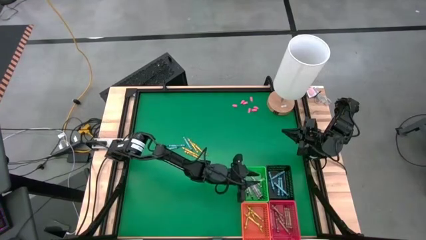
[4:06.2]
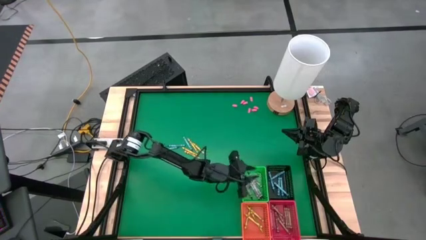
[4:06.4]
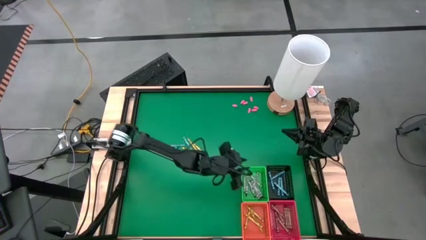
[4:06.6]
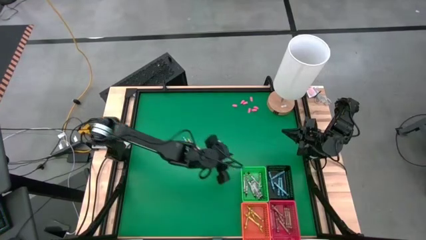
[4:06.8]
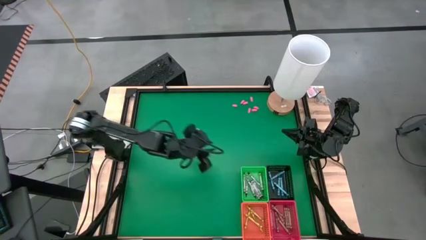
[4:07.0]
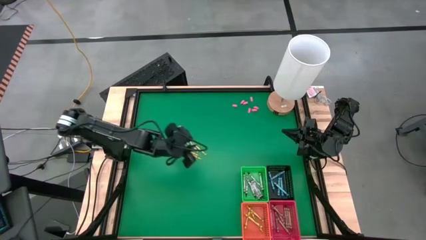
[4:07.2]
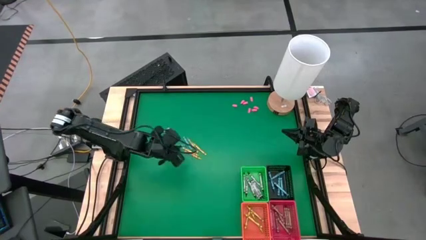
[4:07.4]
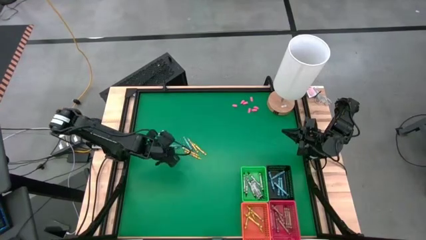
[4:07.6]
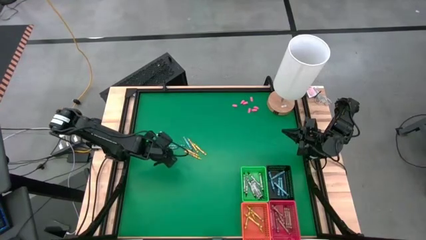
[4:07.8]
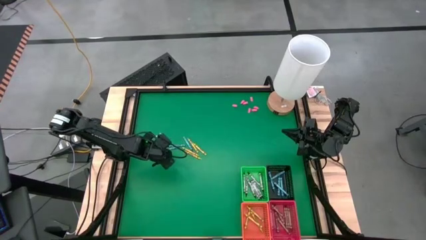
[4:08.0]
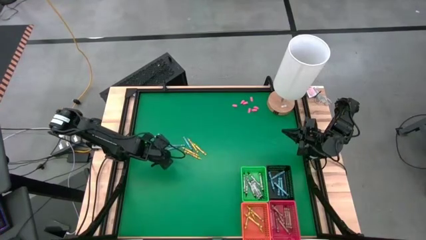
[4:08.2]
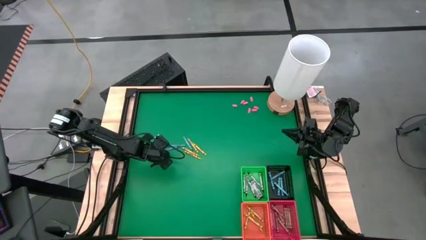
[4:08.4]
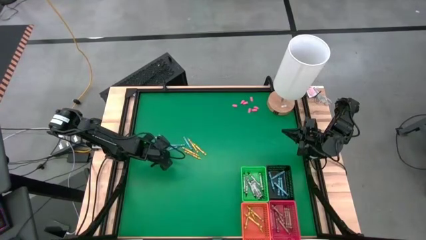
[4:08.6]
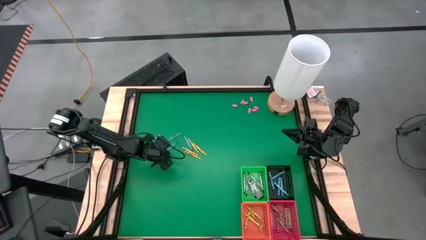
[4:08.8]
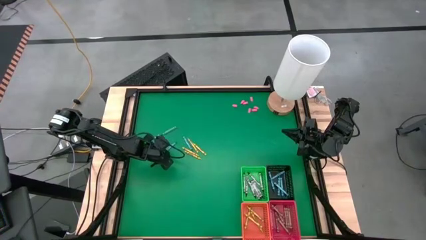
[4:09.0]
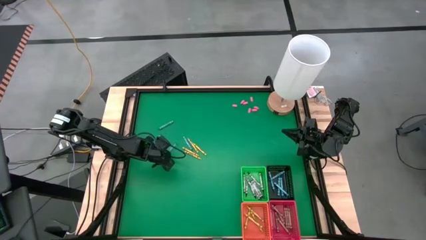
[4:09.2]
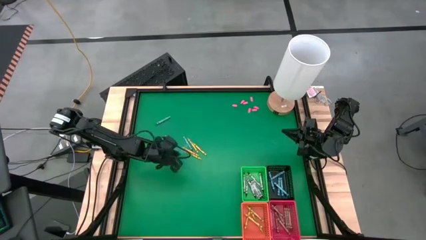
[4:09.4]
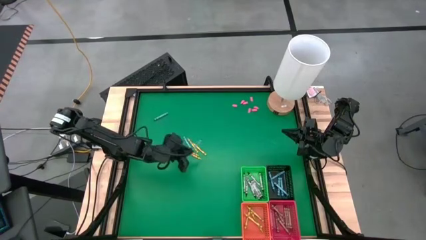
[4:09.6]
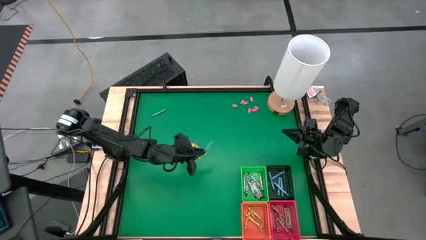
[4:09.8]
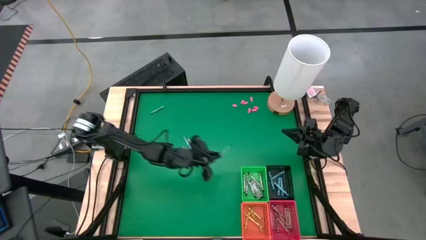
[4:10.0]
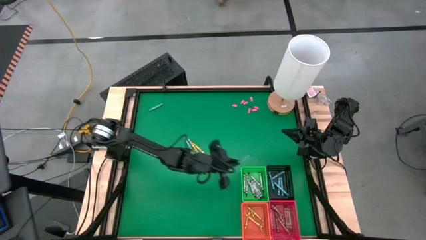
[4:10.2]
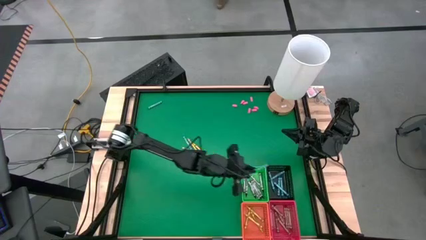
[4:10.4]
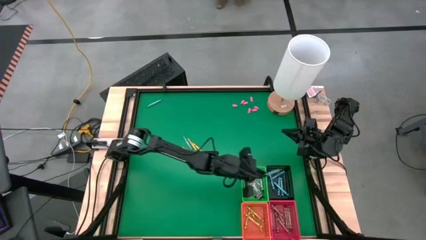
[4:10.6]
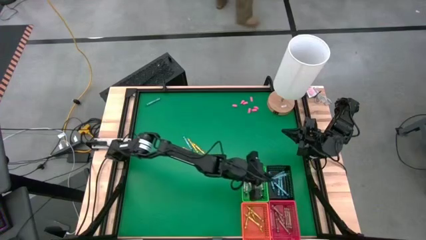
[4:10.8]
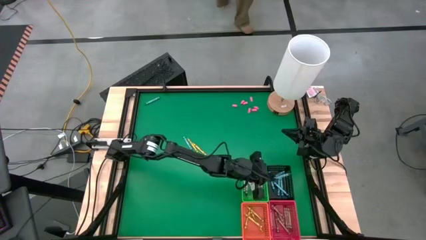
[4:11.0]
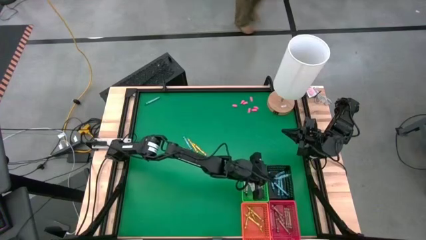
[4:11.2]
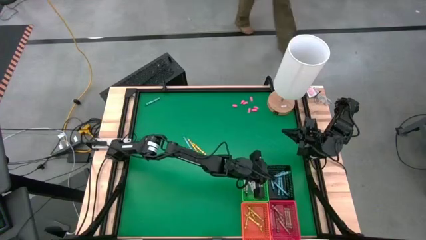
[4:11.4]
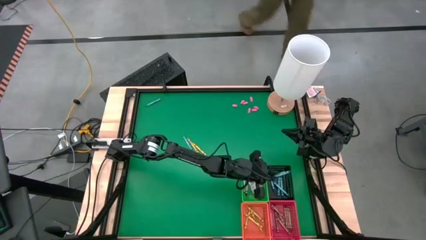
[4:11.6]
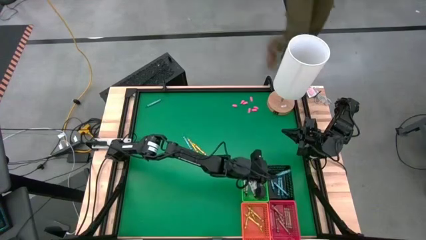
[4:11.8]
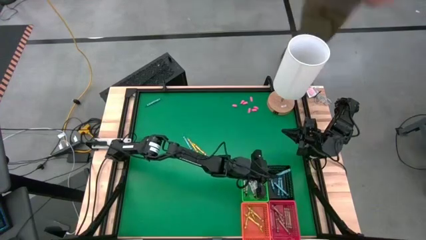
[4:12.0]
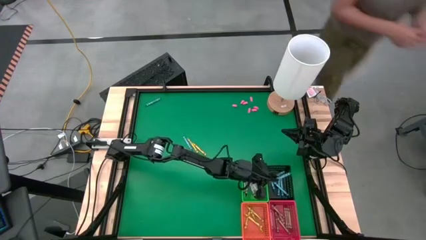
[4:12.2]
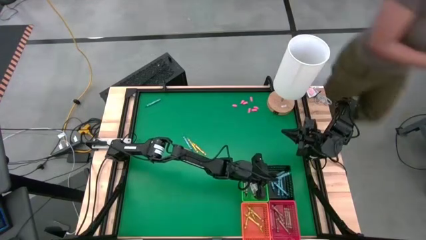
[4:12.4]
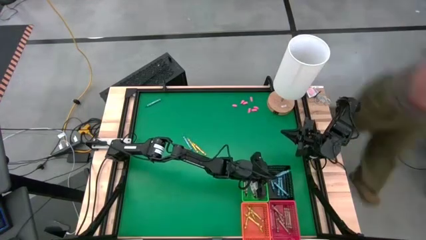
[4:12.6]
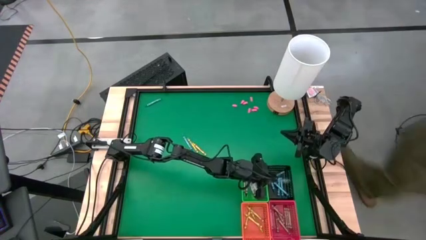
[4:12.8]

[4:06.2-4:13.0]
Task: Sort crayons
Put the blue crayon into the black bin

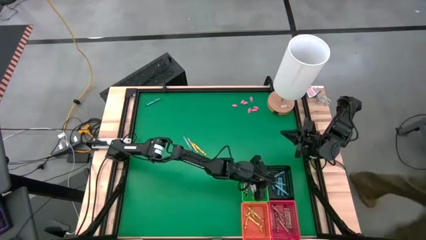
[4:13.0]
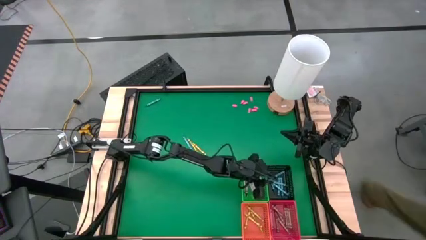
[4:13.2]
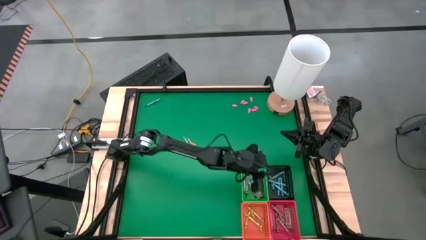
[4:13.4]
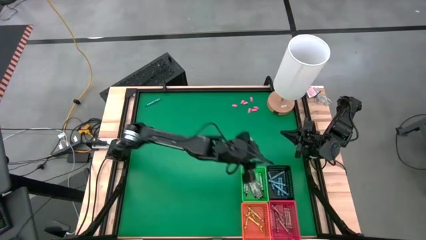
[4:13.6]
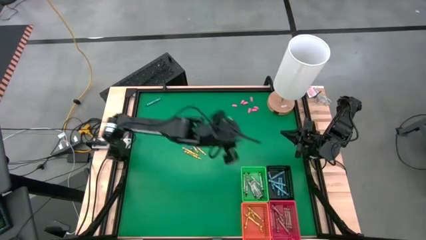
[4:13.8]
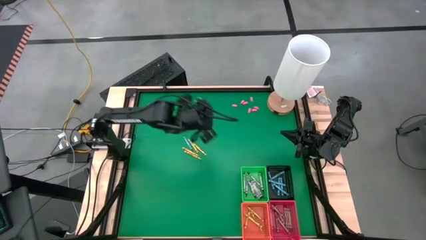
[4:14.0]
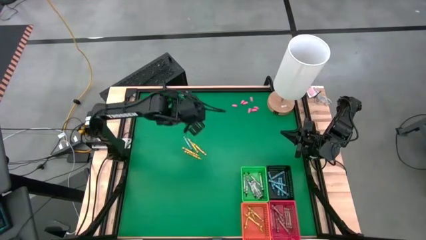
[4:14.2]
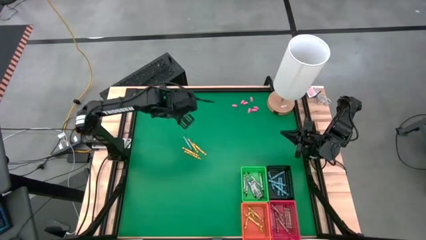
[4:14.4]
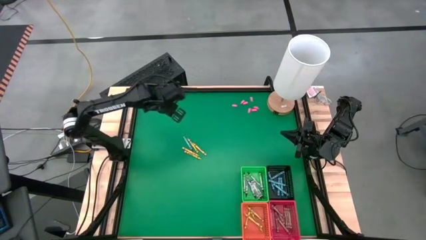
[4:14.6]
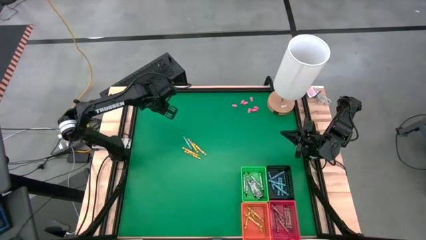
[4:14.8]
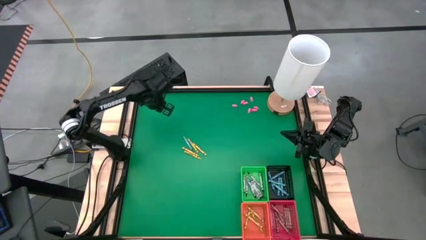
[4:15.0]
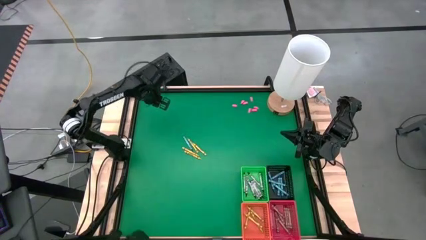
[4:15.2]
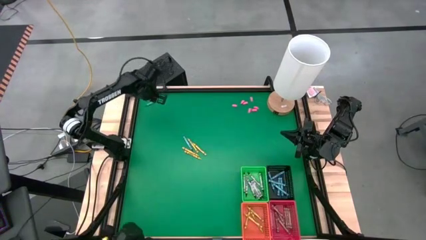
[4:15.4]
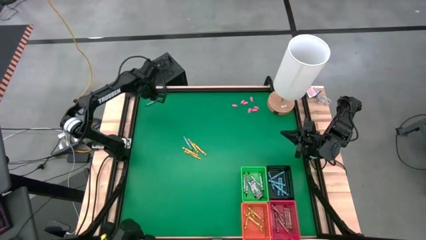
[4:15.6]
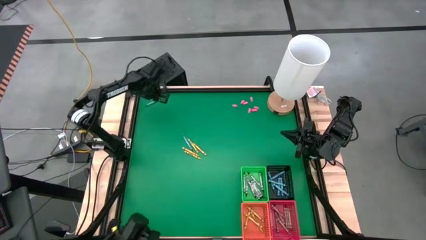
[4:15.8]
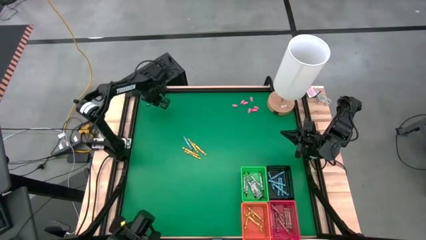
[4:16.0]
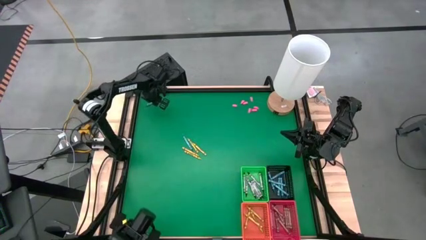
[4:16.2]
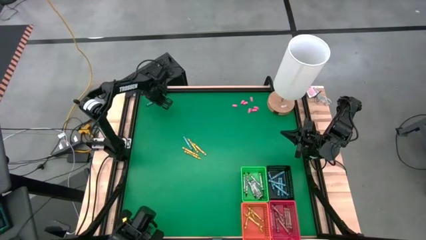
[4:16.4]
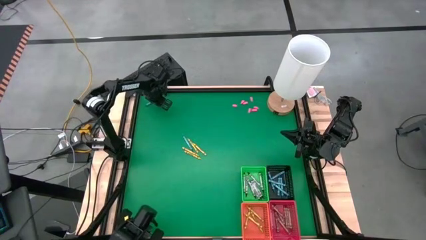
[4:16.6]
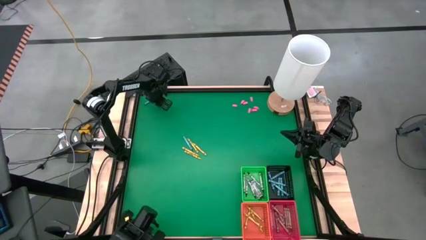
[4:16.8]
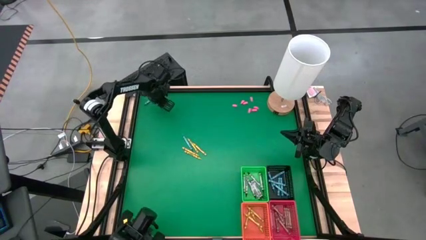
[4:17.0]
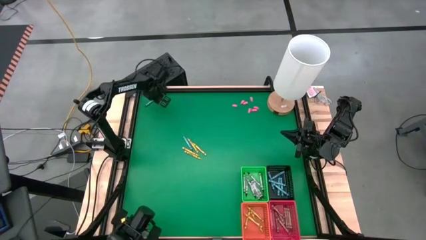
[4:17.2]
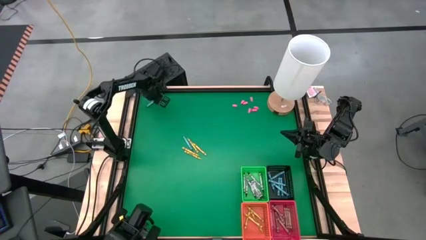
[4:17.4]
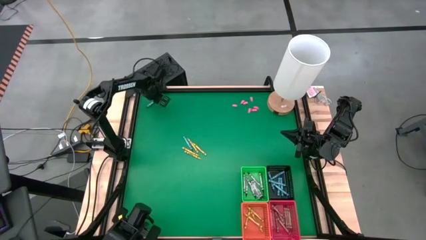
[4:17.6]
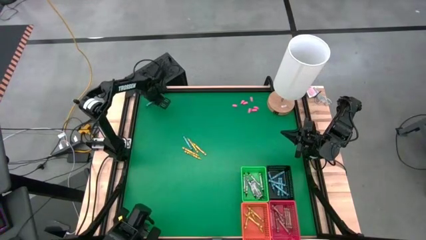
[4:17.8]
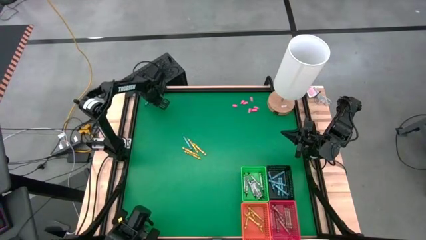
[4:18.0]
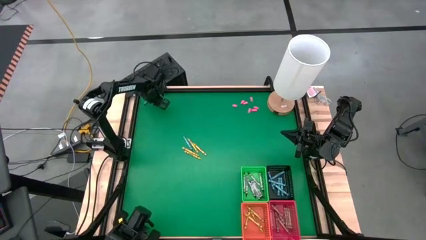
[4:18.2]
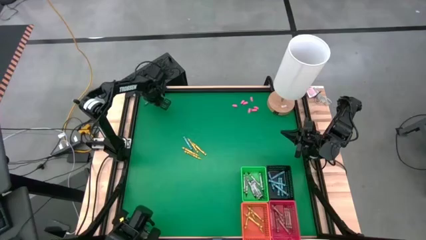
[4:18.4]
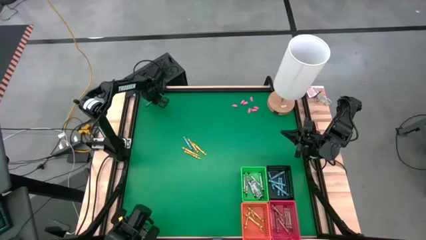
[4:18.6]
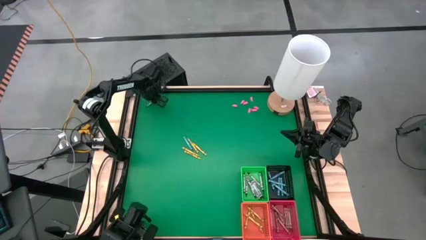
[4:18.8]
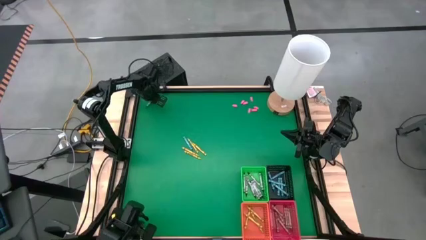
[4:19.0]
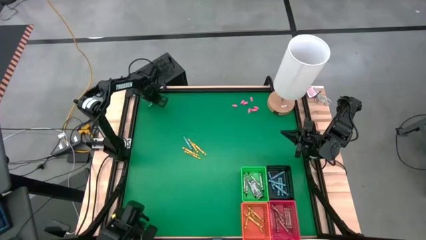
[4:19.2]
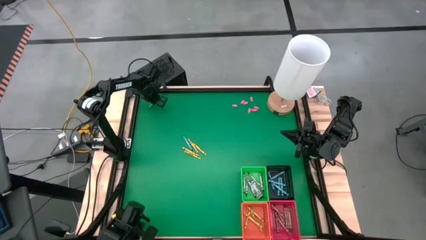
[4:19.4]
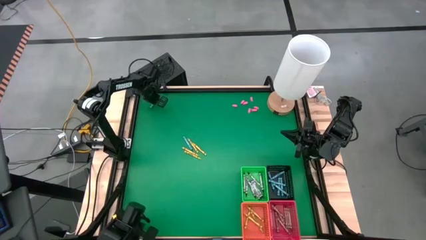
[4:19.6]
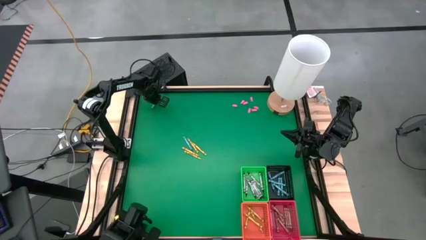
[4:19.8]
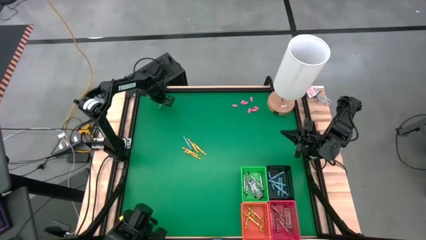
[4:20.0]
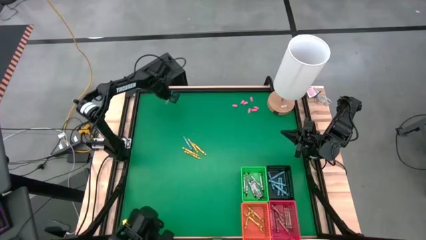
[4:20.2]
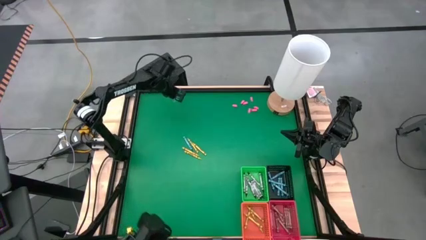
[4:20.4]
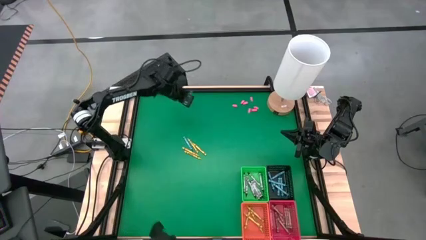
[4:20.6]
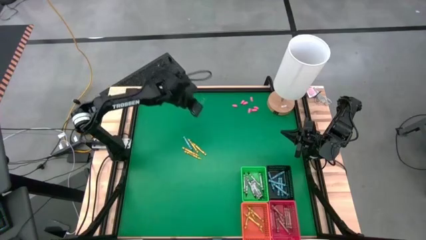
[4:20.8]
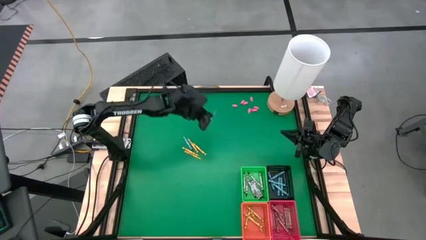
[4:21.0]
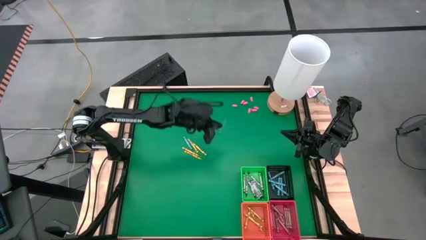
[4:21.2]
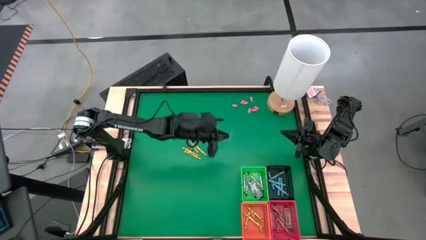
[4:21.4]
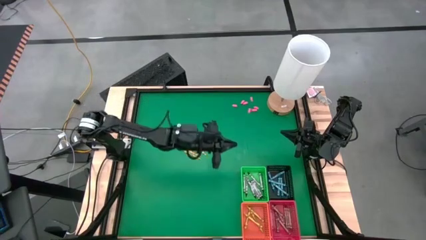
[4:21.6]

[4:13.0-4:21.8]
Put the blue crayon into the black bin

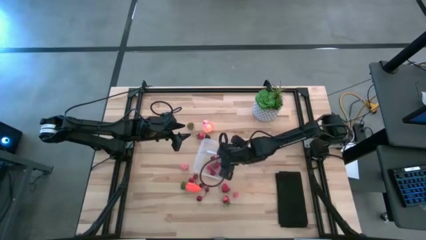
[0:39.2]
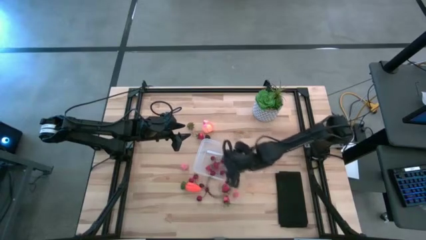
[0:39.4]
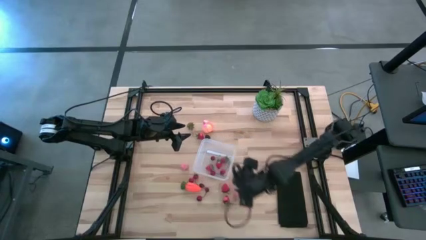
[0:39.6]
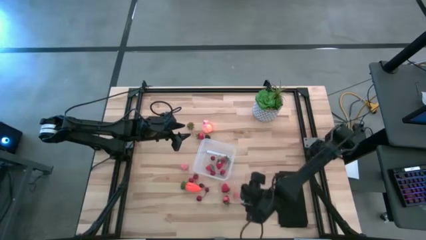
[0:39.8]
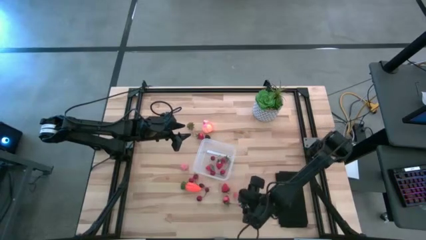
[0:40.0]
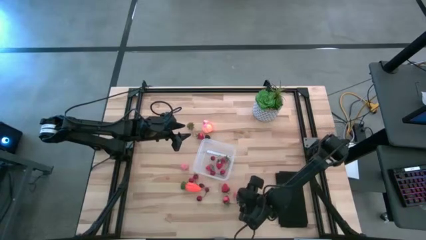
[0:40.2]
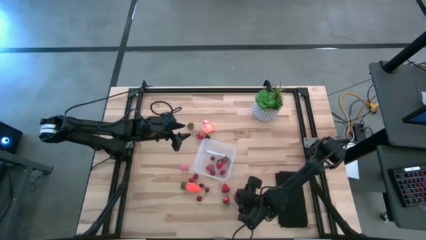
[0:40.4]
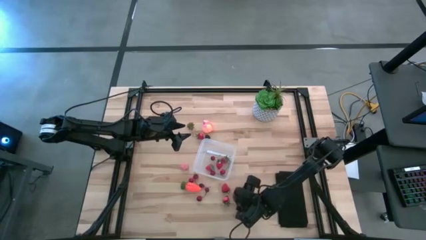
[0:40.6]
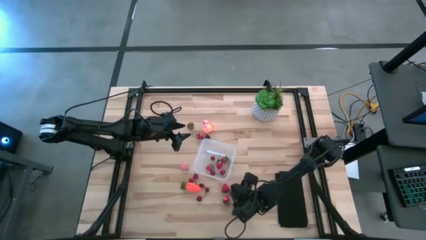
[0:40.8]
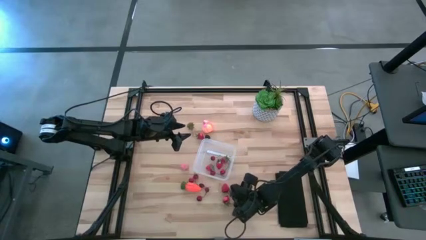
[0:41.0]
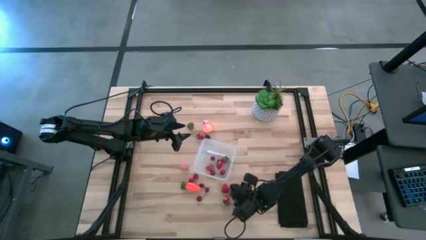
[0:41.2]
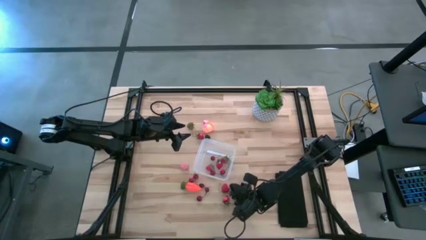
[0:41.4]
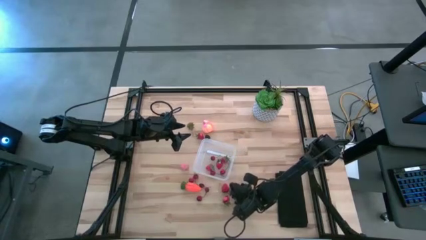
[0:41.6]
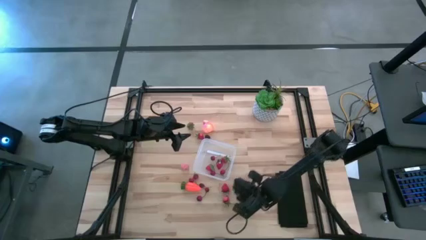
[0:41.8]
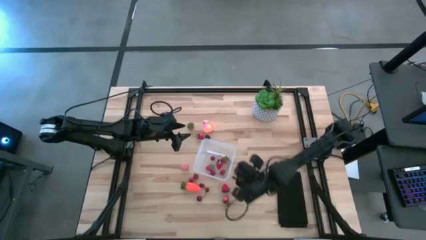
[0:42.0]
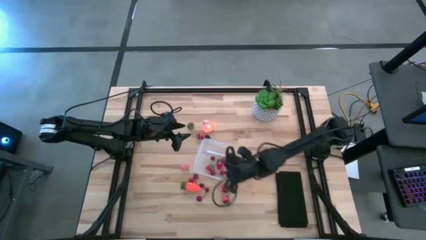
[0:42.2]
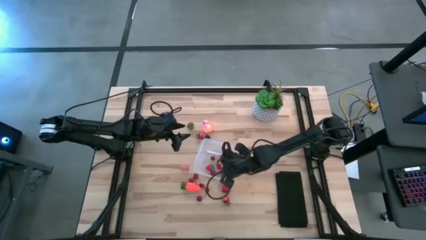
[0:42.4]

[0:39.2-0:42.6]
Task: Pick and placing Produce into tupperware
Put the pink peach into the transparent container
